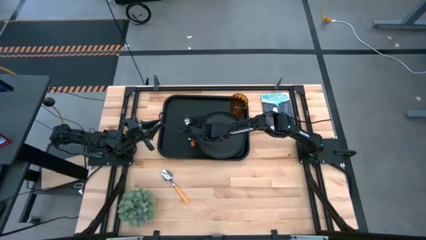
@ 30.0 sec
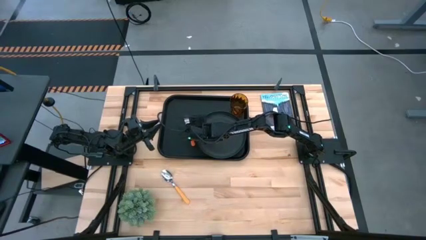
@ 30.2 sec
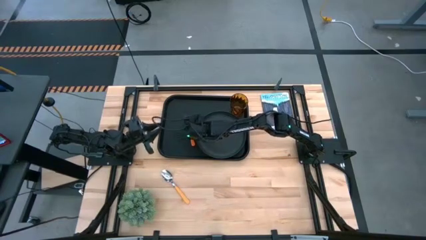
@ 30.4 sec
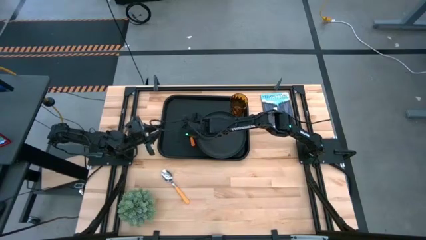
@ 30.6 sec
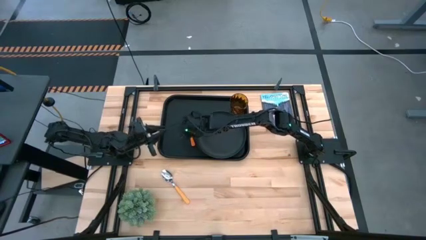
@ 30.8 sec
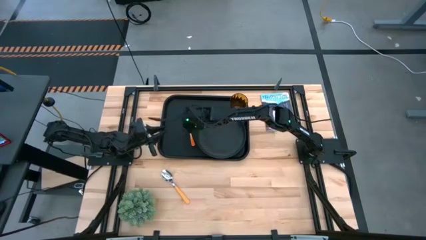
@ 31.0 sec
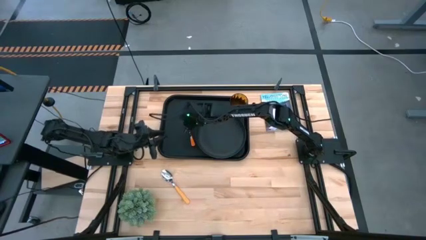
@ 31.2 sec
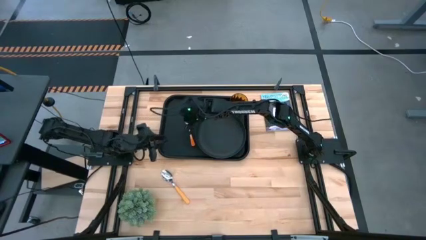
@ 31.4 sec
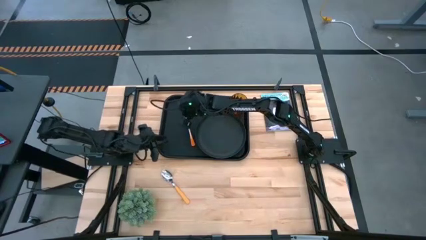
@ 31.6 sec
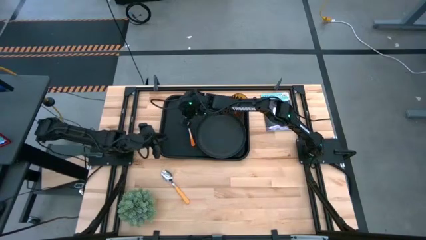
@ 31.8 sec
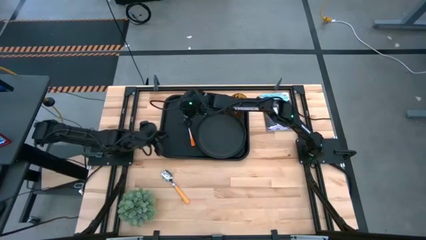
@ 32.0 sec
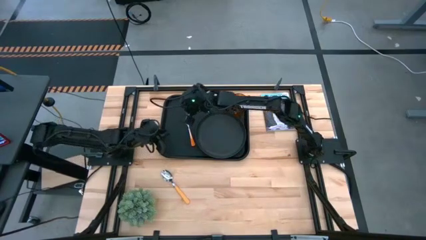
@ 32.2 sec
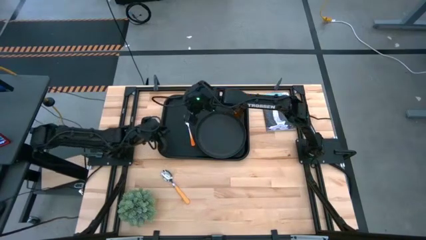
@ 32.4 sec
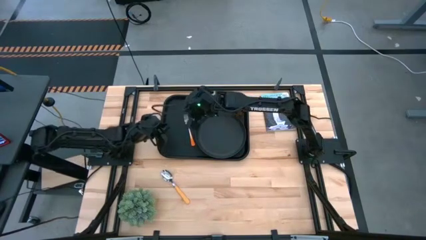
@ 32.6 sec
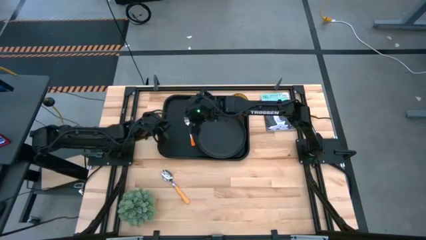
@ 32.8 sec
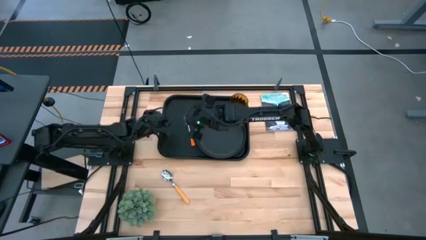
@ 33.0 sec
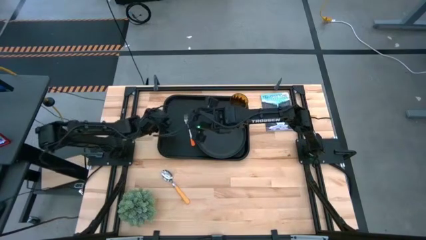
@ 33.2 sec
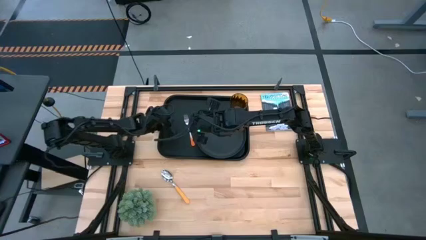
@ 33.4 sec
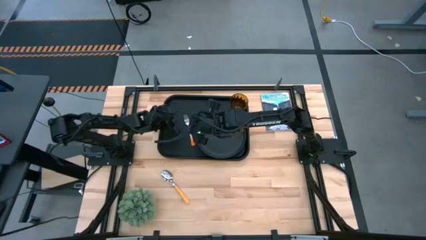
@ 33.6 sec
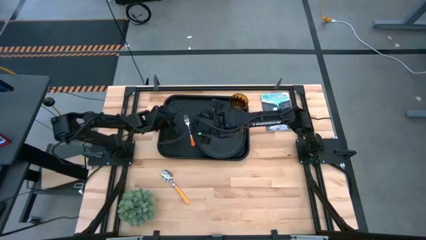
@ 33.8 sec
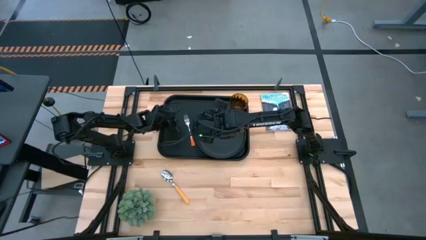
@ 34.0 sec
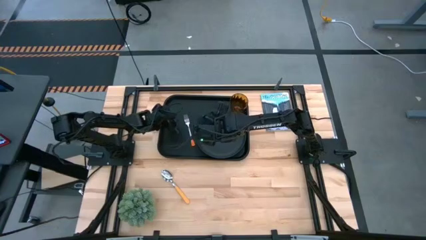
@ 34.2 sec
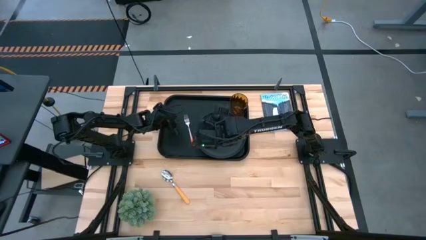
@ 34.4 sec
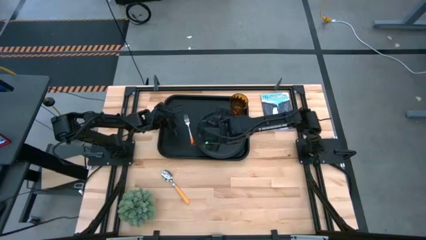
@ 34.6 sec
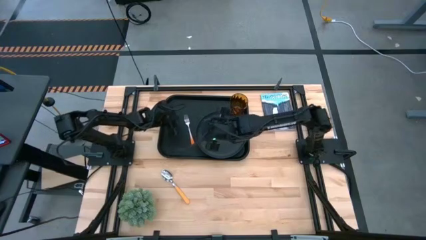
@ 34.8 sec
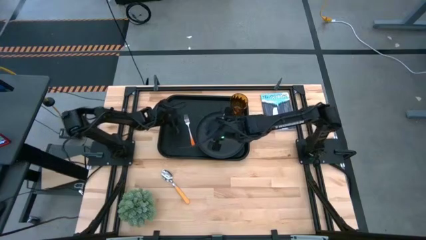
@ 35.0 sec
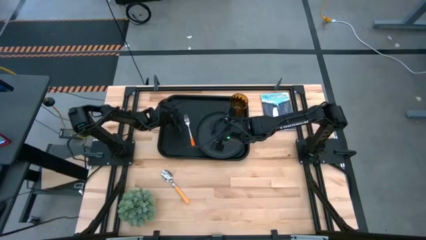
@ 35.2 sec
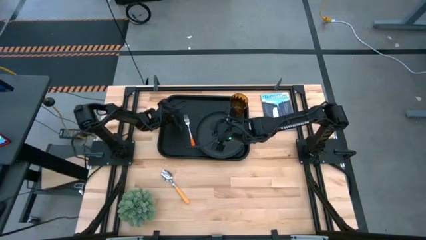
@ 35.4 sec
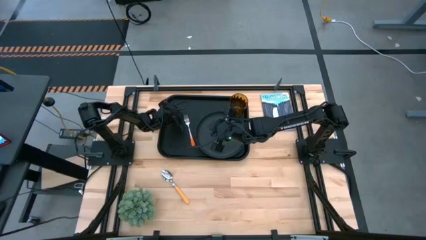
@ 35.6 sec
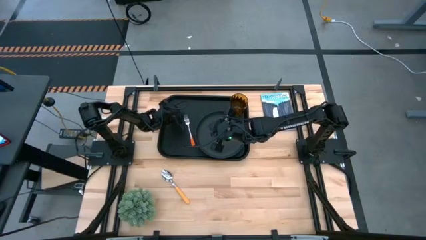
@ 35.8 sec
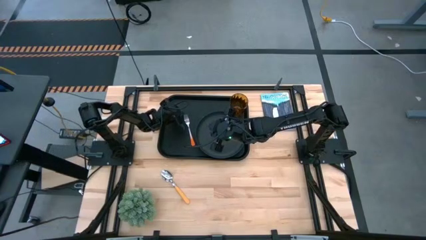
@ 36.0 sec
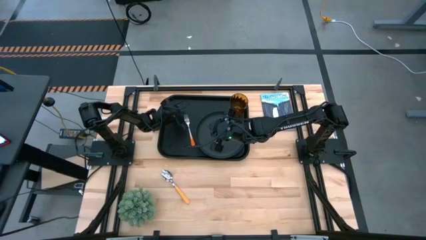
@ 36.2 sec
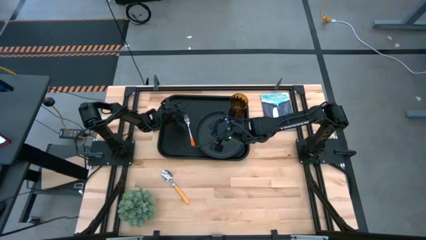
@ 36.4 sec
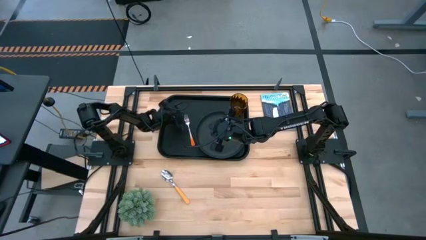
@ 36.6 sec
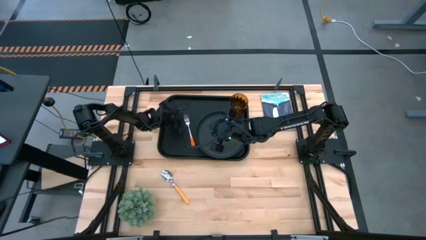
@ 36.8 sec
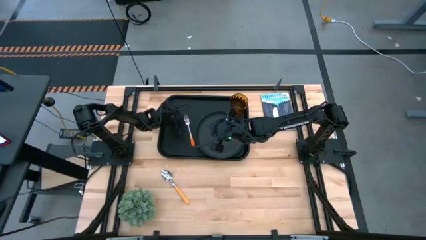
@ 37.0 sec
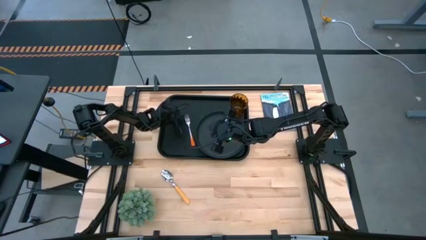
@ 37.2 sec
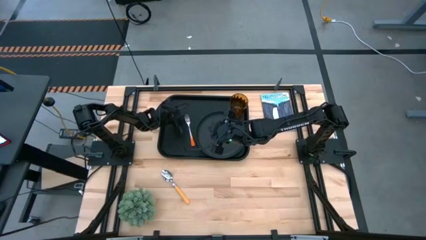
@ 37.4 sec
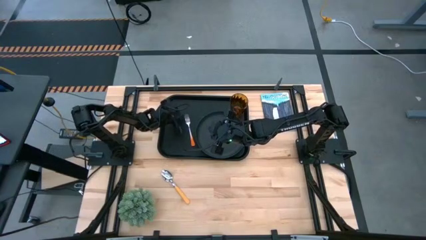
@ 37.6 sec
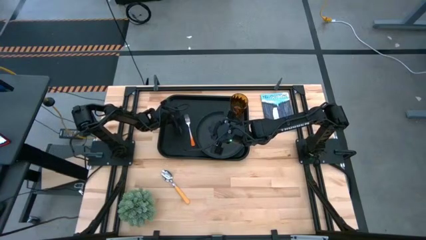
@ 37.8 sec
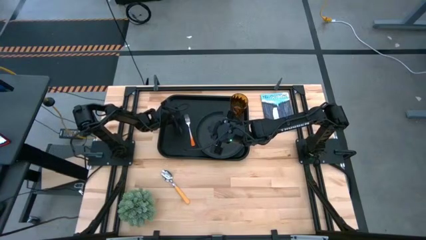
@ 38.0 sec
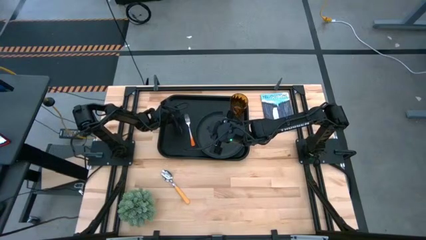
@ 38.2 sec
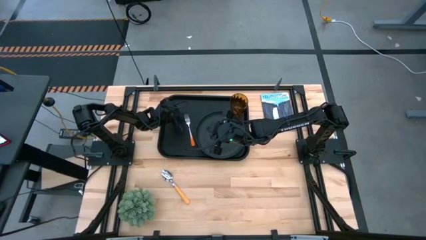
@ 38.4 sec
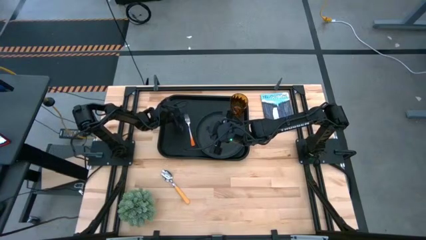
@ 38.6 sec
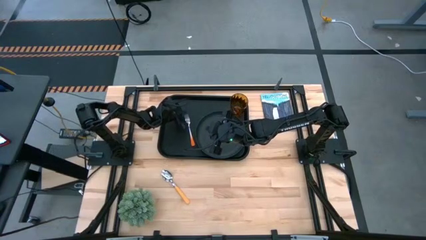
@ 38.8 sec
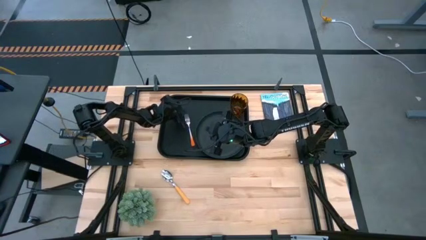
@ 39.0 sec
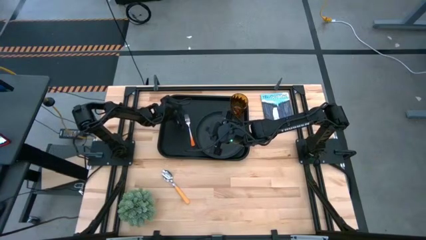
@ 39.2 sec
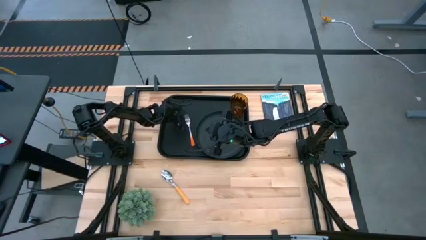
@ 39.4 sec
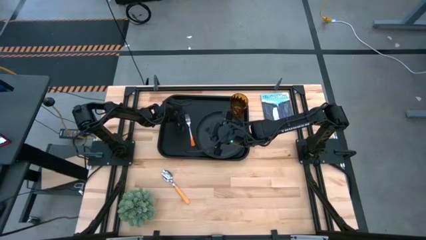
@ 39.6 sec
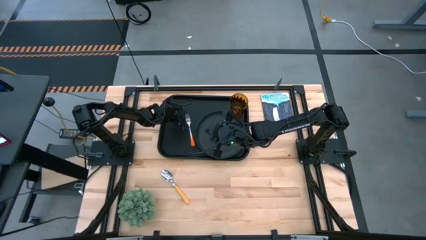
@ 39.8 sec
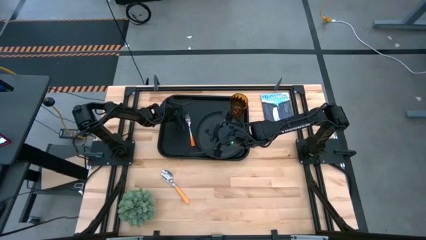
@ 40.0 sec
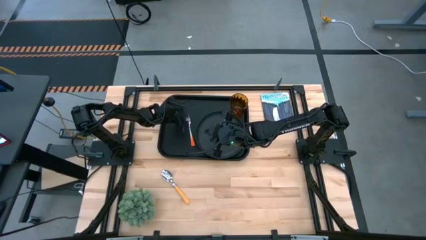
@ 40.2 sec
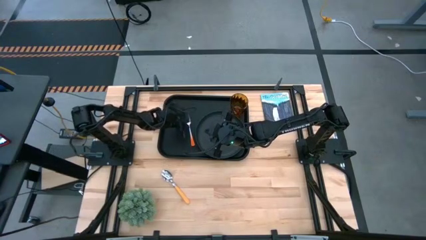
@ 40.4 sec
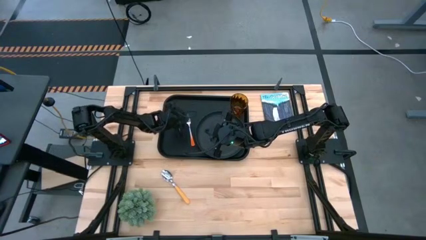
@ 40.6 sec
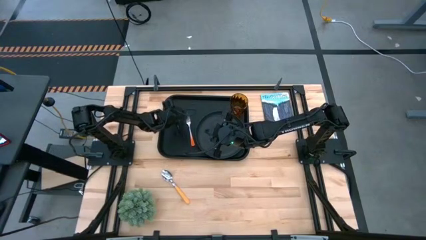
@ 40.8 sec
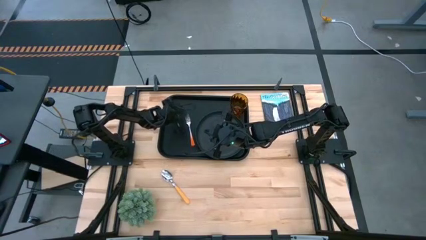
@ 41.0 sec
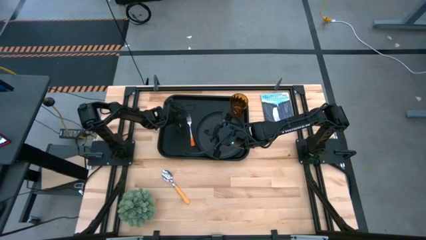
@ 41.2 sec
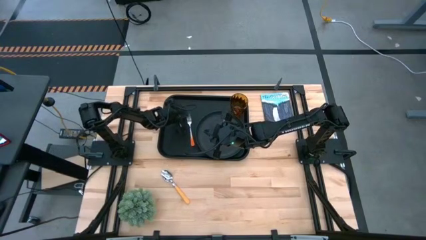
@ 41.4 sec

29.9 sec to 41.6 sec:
Task: Pick and place plate/cup/fork/spoon on tray
Adjust the orange fork

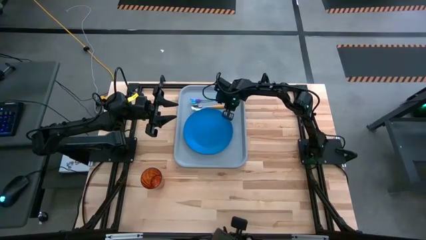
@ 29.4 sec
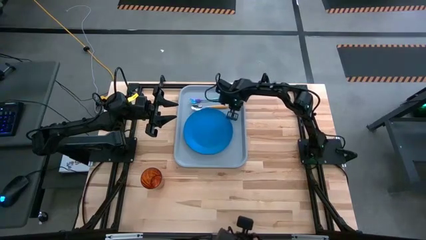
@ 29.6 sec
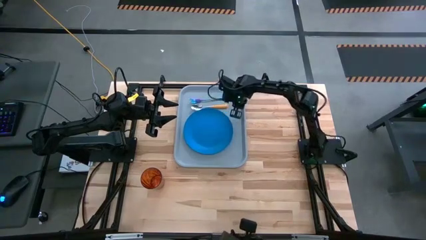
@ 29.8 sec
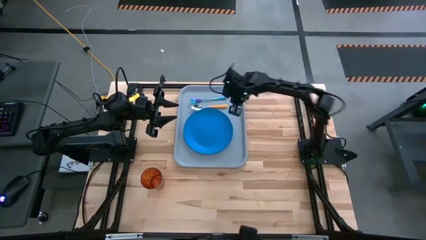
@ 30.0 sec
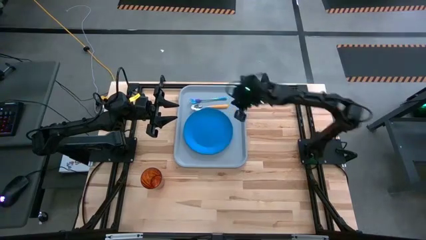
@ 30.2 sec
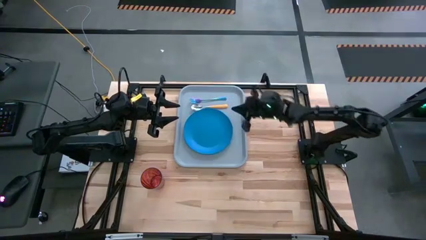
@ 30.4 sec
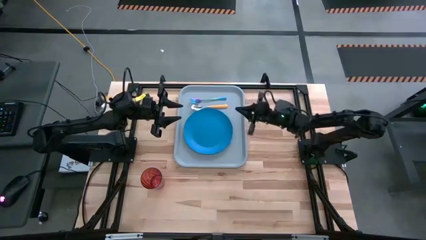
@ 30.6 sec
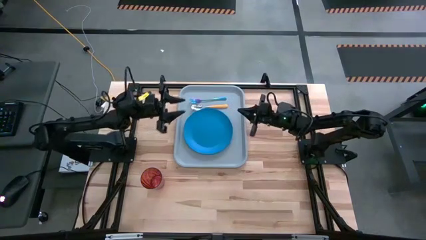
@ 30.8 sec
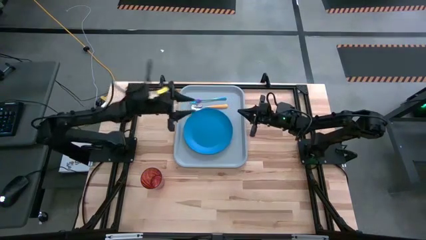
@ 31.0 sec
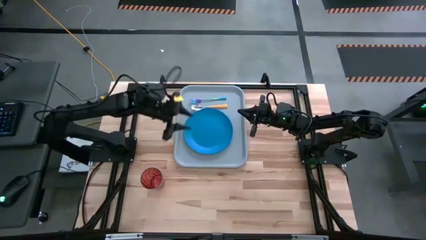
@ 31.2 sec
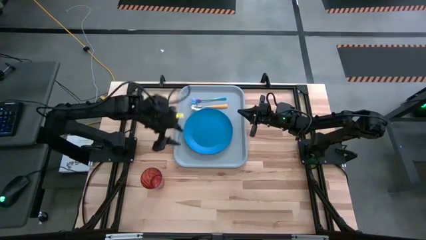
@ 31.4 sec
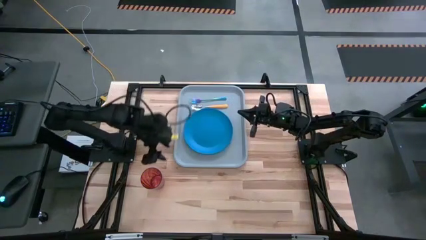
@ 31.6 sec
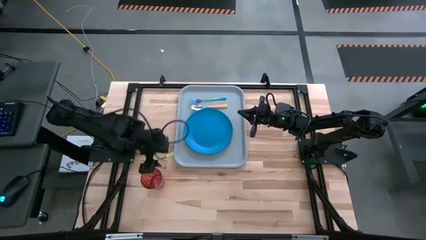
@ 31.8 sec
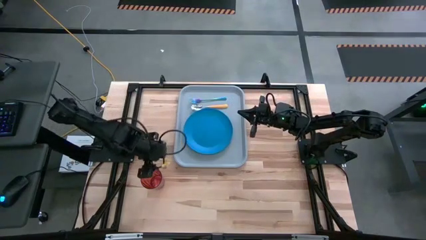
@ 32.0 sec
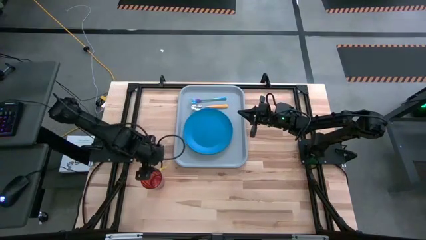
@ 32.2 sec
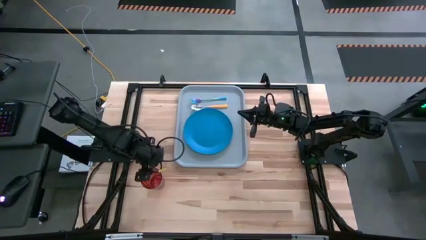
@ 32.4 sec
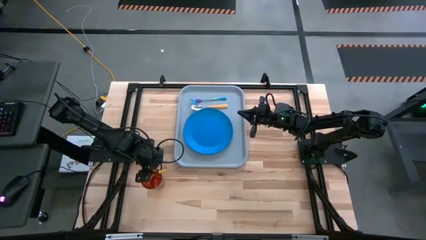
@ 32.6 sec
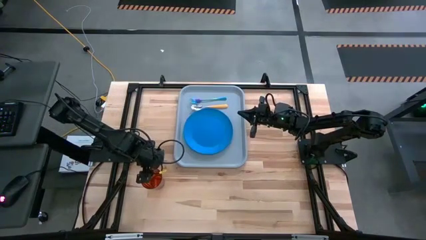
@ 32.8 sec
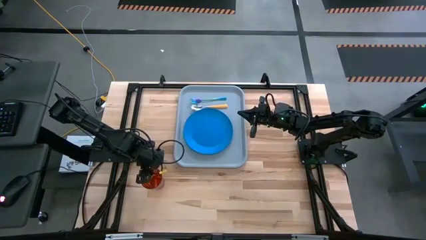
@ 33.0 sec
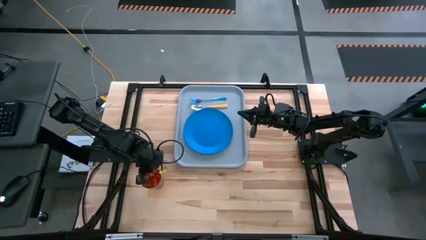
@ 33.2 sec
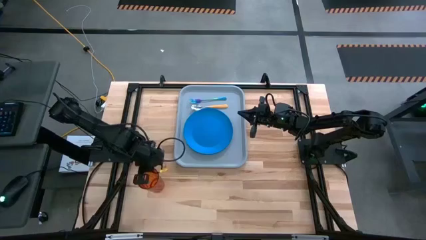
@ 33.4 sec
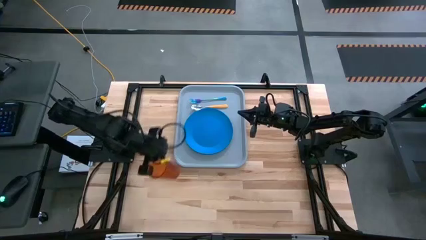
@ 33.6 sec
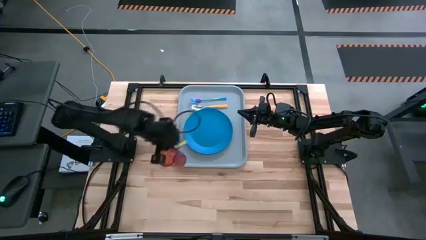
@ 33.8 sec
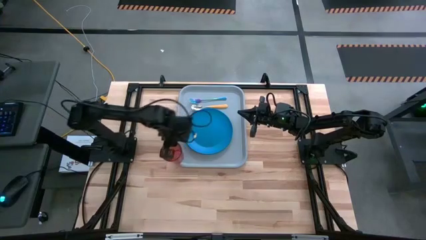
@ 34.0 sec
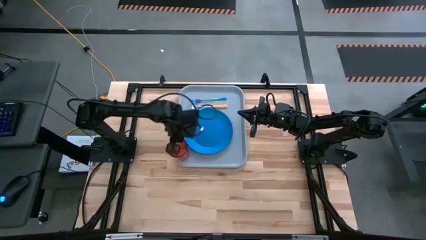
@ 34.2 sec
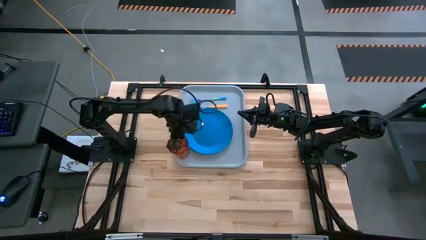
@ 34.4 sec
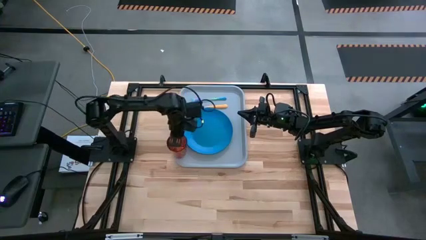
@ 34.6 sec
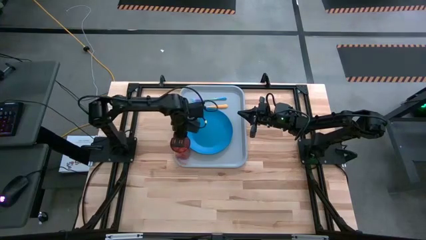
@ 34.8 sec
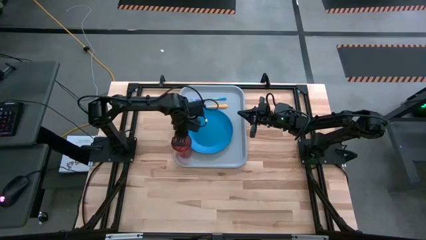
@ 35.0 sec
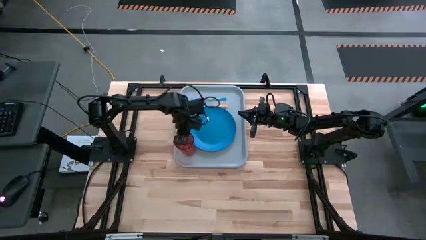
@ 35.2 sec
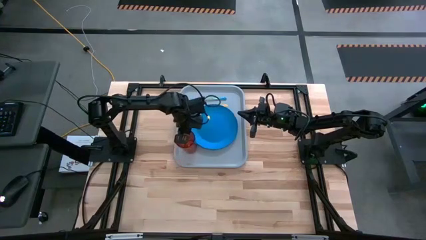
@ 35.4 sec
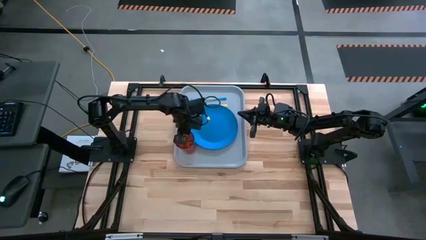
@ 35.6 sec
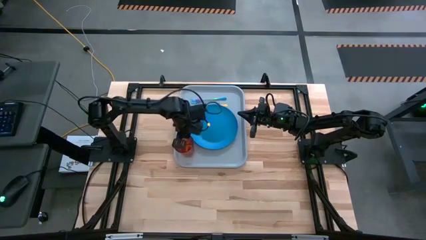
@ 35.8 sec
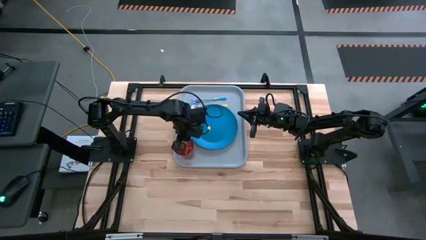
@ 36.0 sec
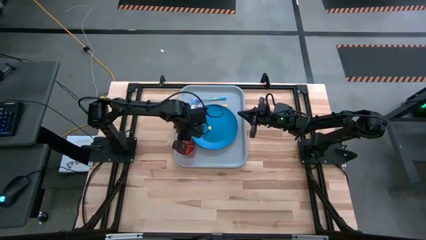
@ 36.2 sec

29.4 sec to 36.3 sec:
Task: Pick and place plate/cup/fork/spoon on tray
Put the red glass on the gray serving tray to the top left of the blue plate
